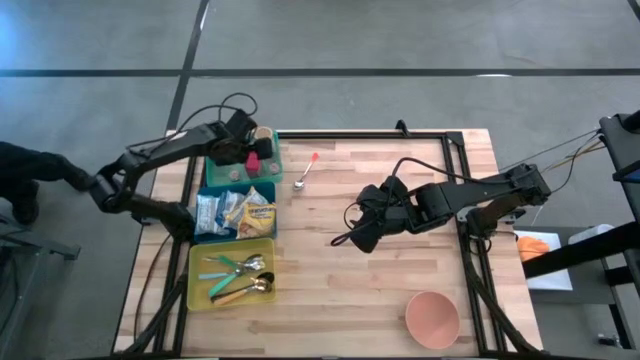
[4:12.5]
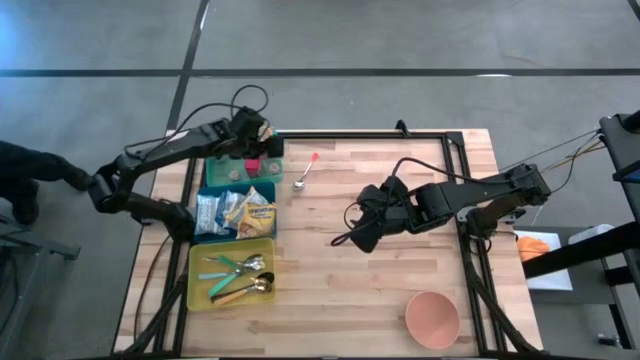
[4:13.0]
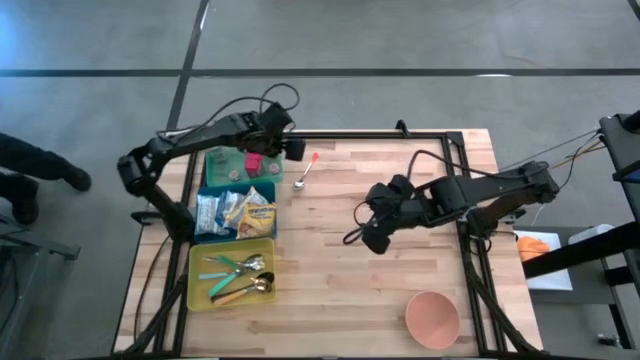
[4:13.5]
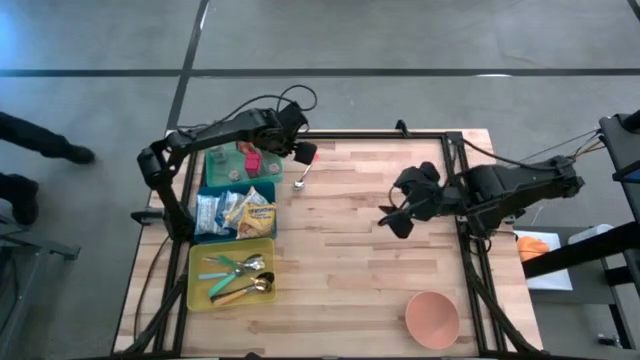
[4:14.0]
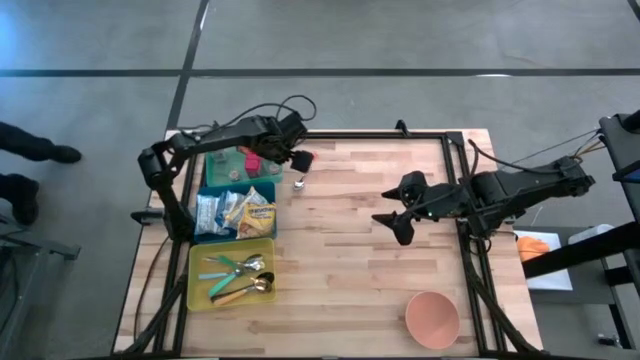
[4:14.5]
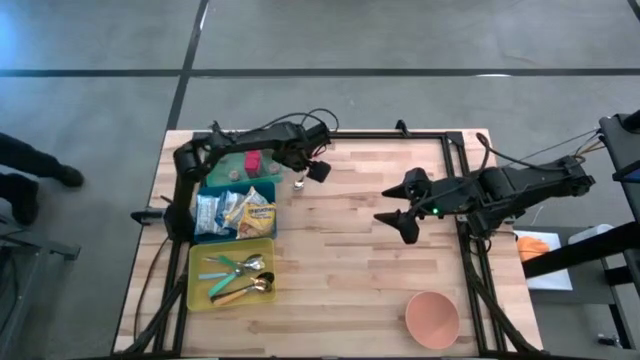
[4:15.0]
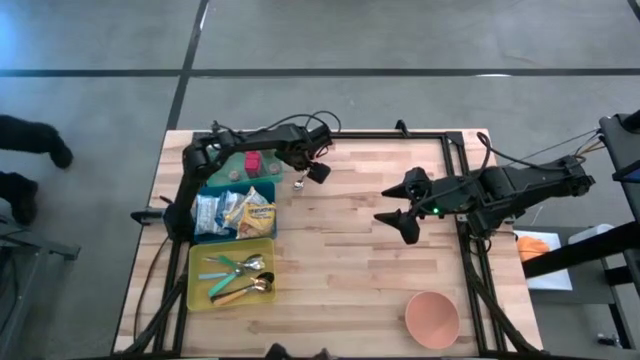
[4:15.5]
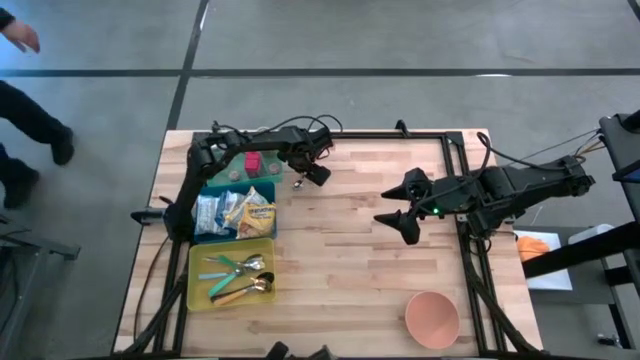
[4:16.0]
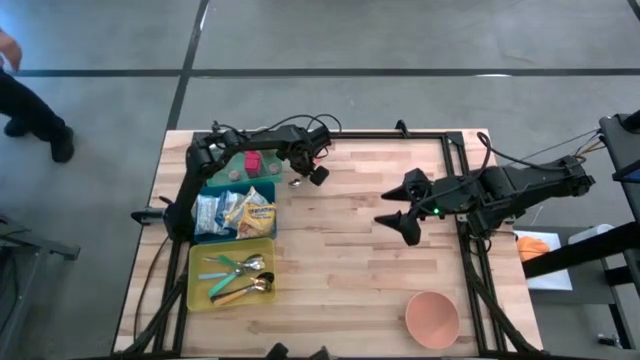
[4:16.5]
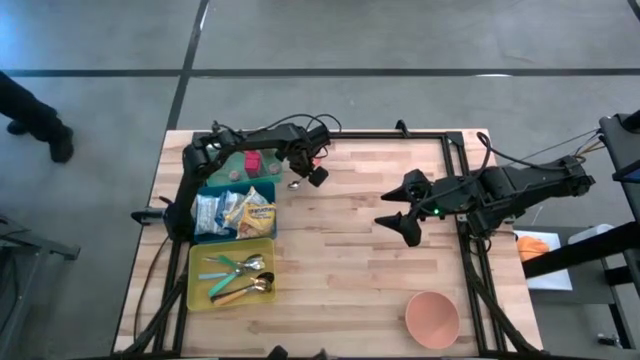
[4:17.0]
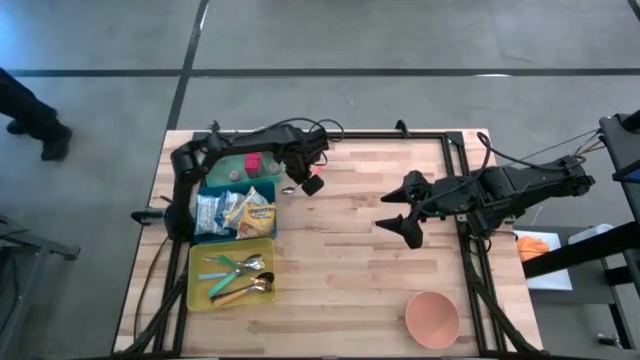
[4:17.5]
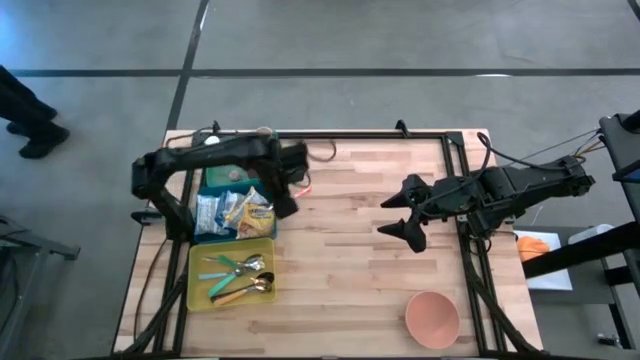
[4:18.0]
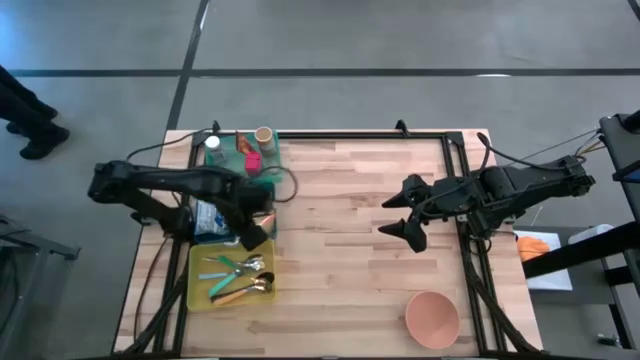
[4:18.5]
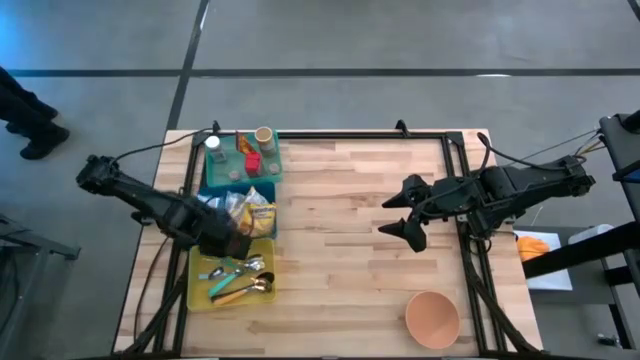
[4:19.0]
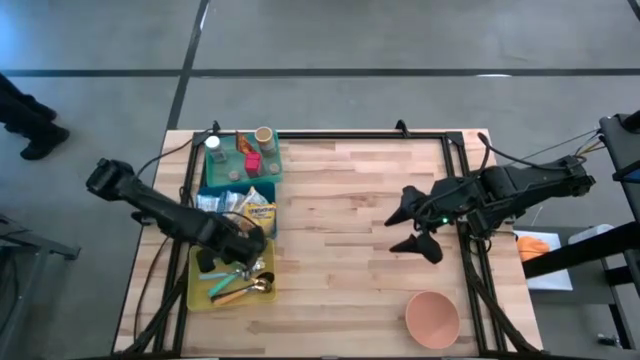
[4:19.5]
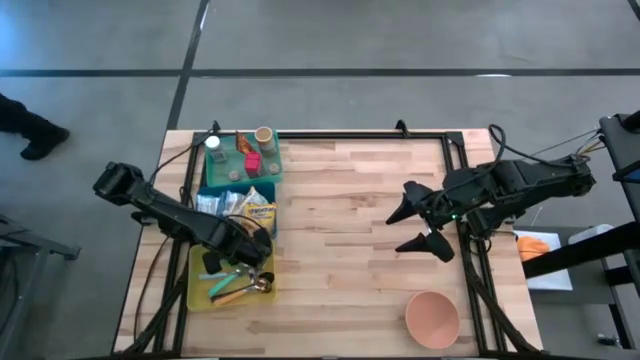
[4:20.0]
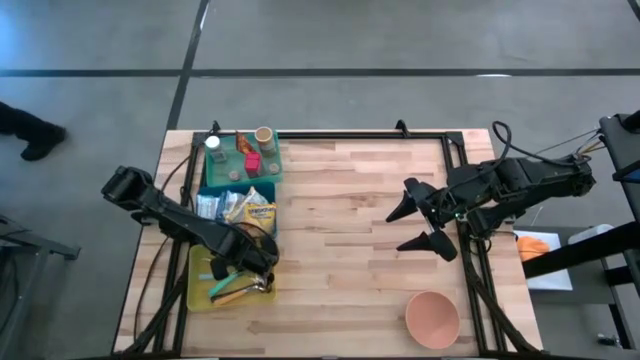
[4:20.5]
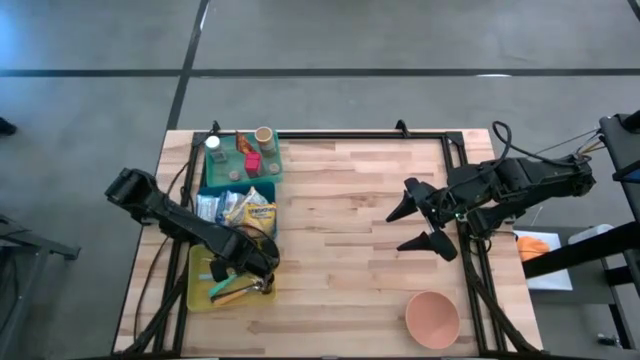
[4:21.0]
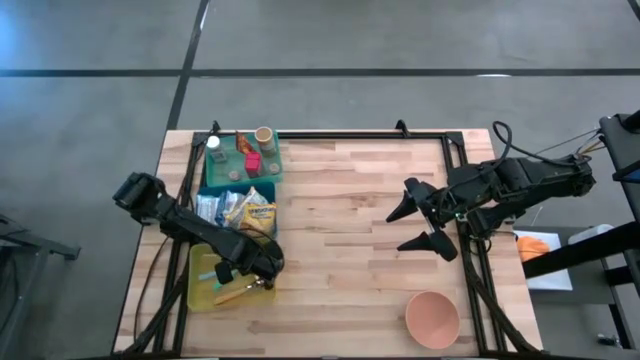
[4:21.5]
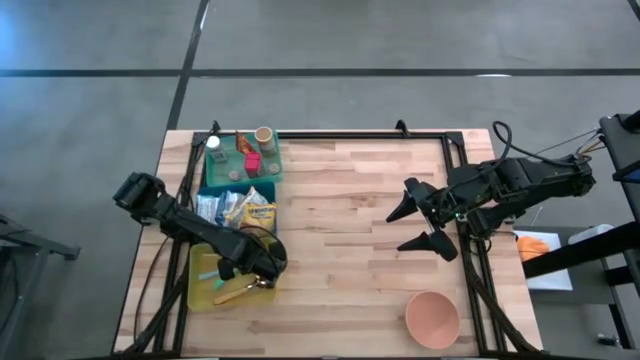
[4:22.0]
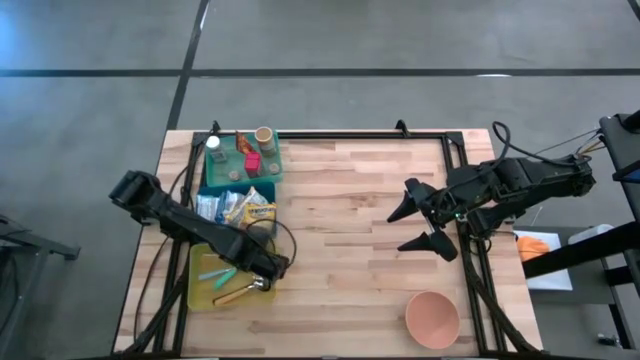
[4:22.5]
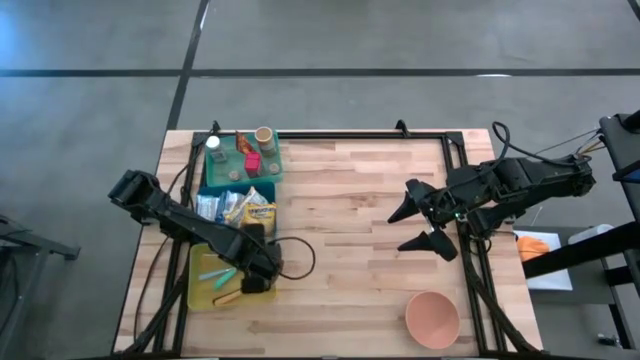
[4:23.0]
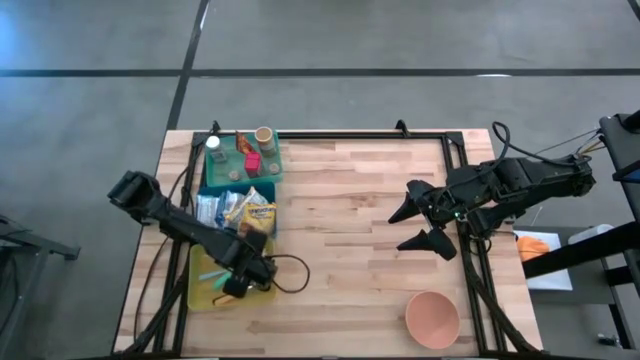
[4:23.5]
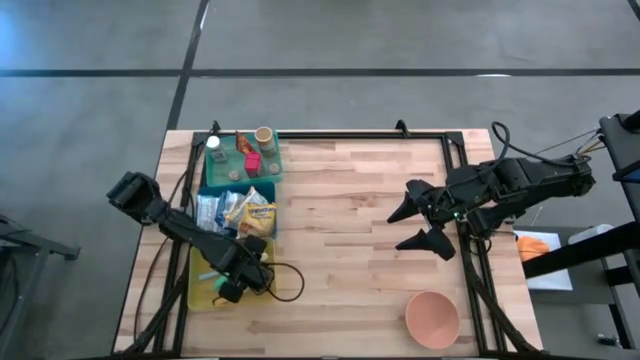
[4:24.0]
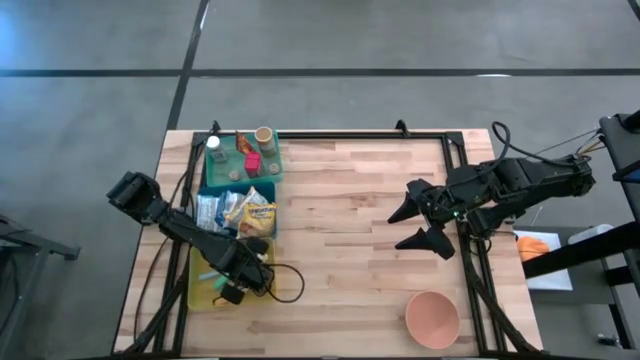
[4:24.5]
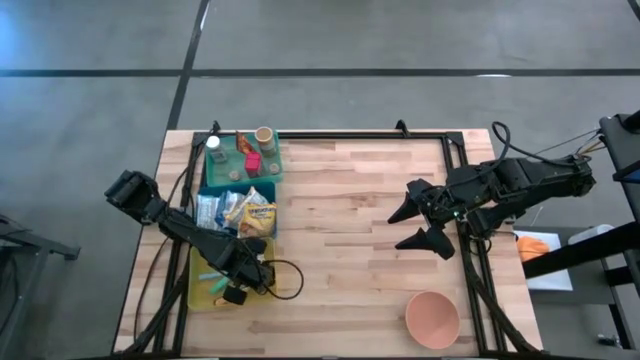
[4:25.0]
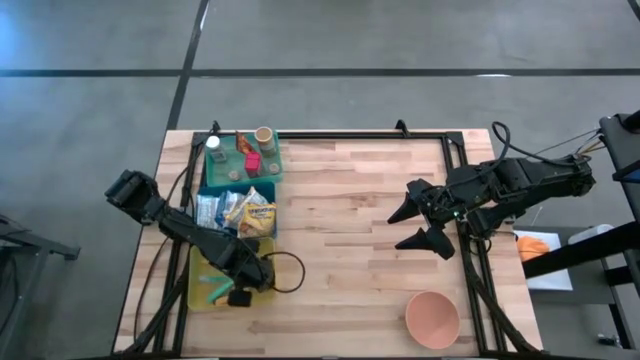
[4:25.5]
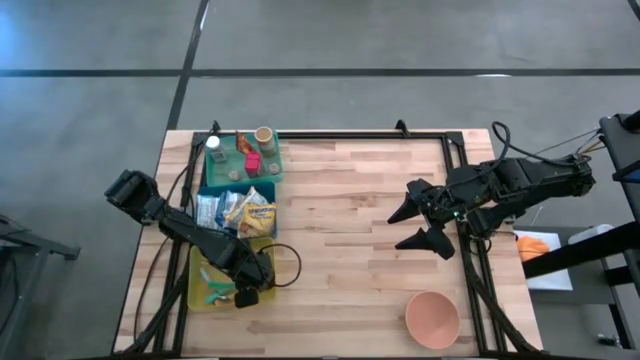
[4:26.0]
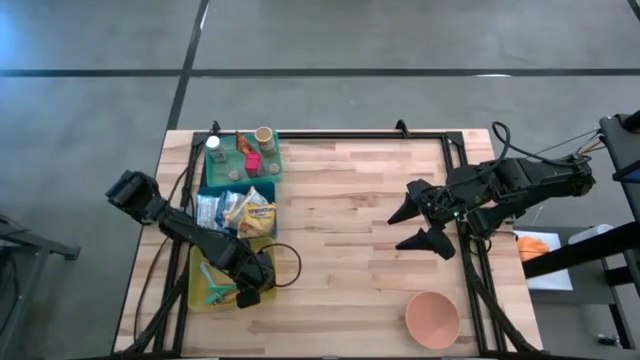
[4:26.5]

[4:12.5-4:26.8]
Put the orange and white spoon into the yellow bin

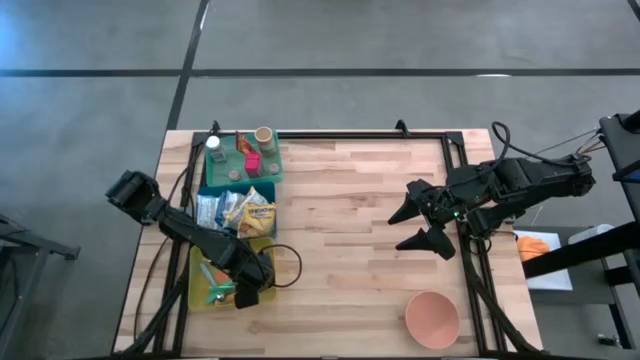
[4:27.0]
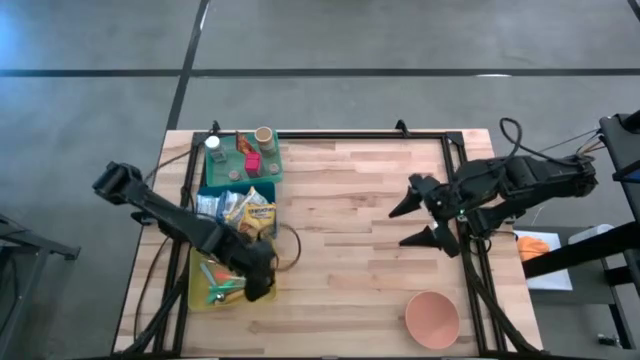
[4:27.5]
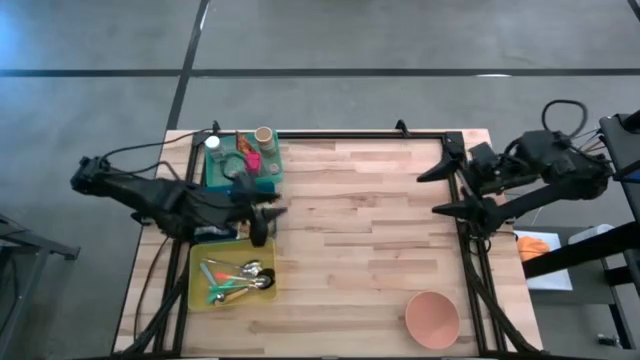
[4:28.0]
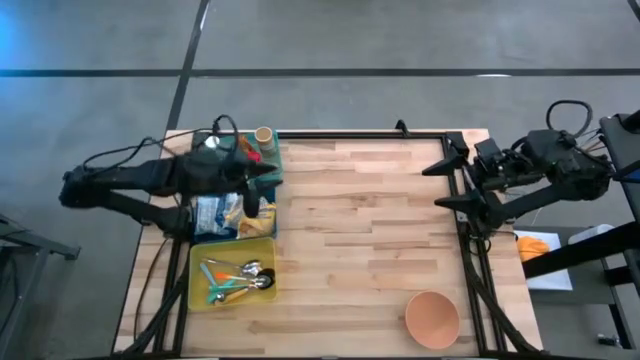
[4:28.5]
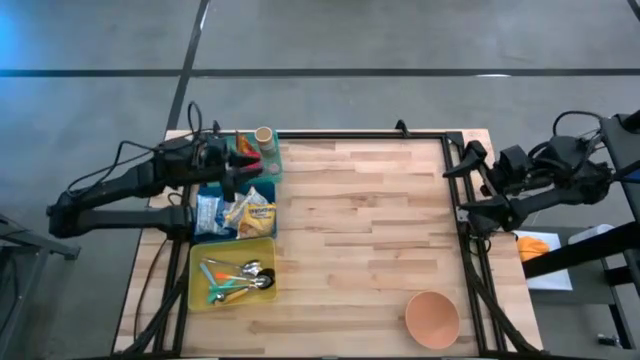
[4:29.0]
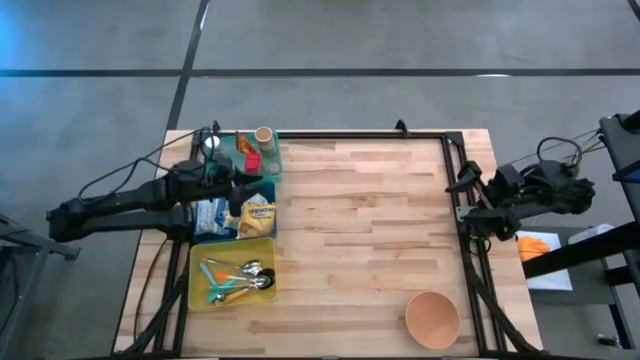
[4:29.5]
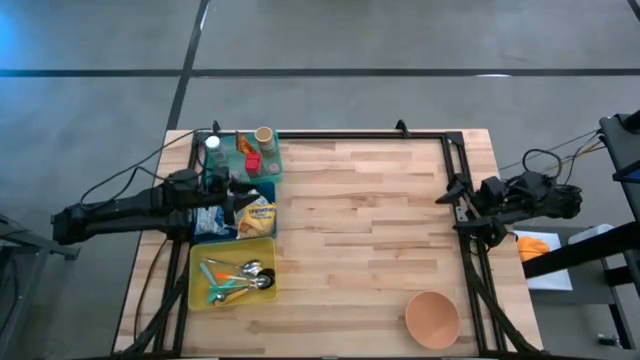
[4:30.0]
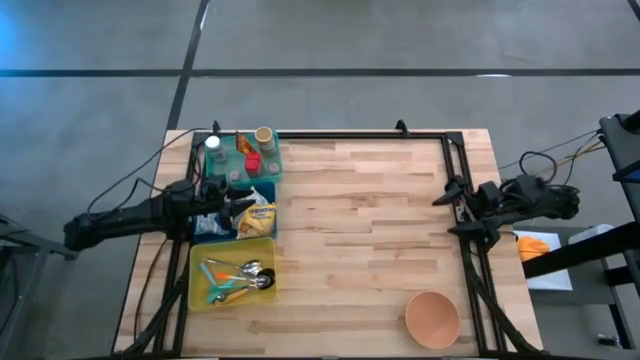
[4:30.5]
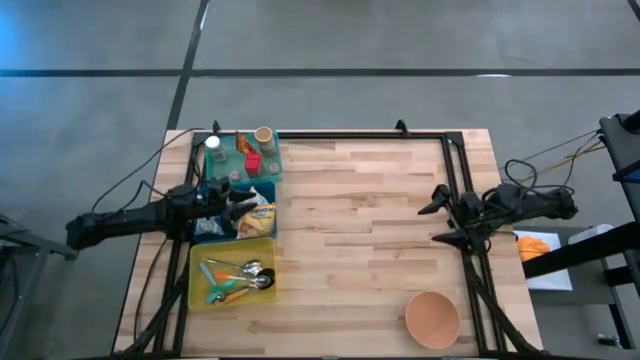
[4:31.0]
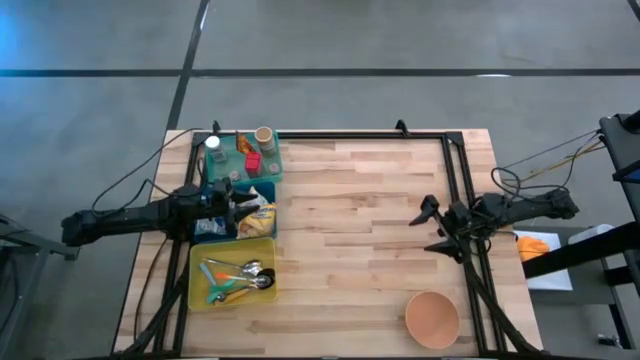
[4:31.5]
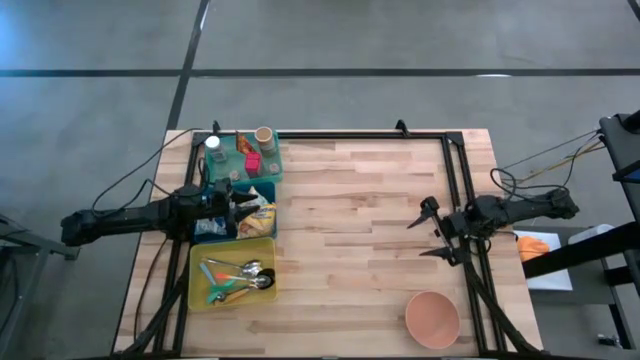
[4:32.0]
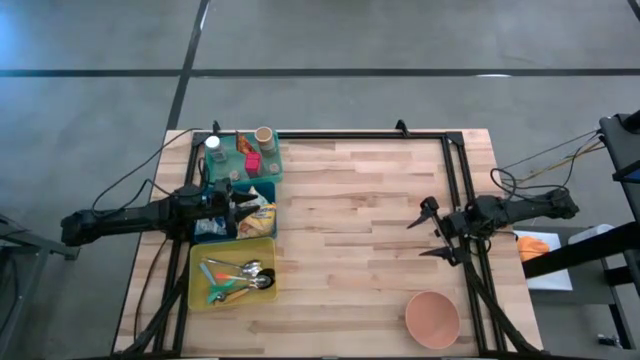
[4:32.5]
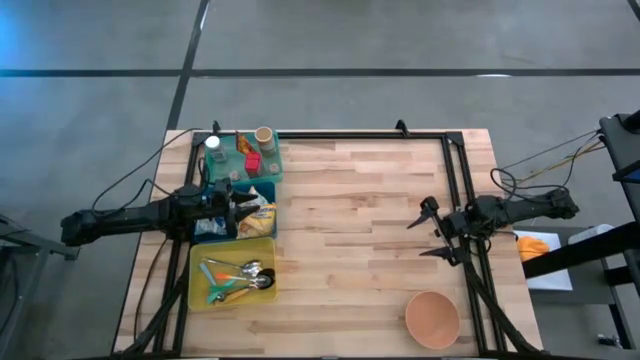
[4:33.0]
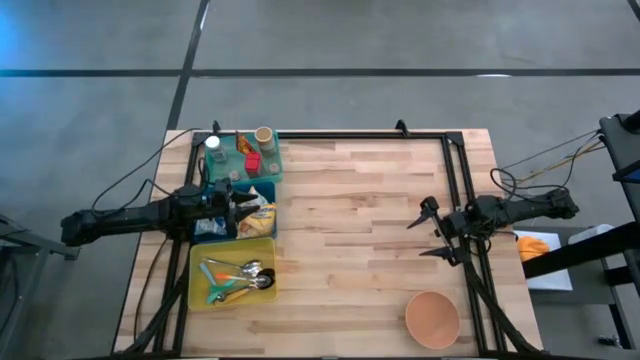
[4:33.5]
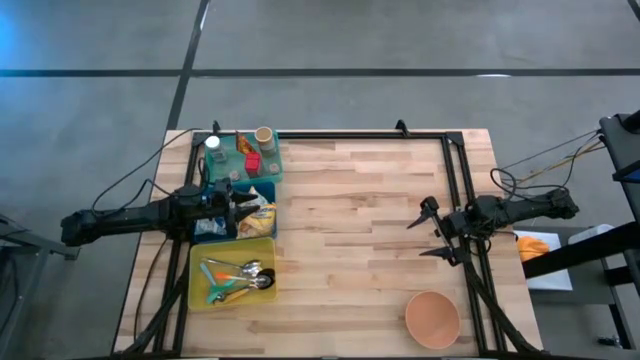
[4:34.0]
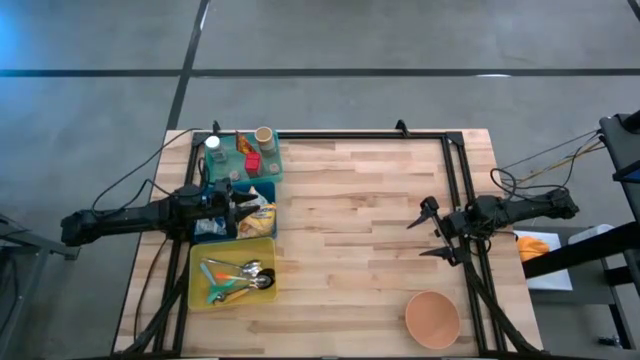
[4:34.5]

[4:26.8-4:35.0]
Return to Home Position
